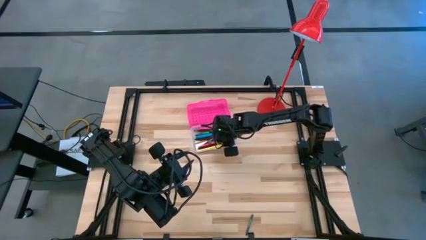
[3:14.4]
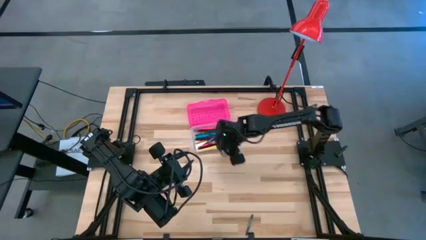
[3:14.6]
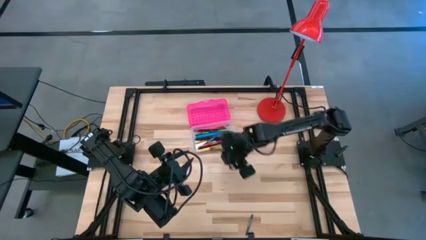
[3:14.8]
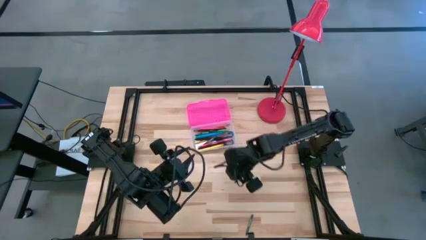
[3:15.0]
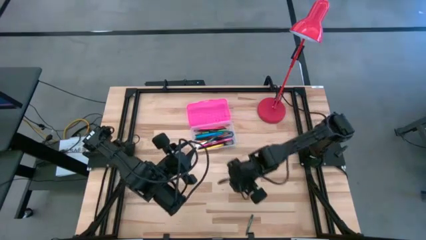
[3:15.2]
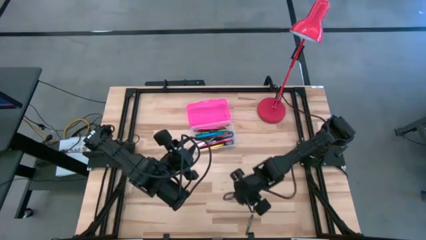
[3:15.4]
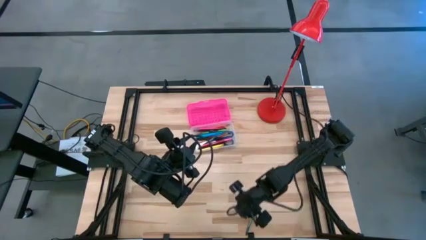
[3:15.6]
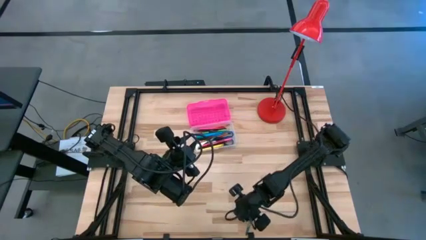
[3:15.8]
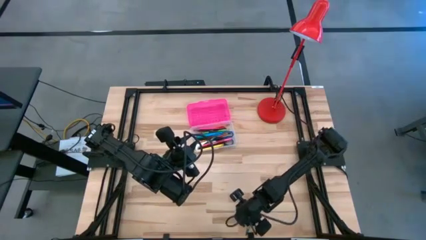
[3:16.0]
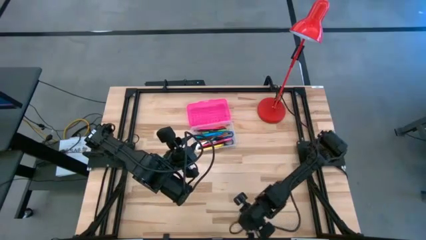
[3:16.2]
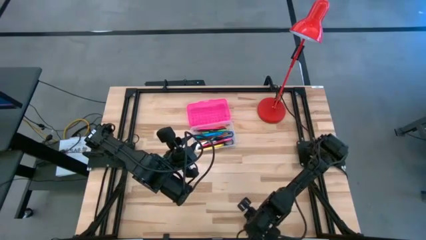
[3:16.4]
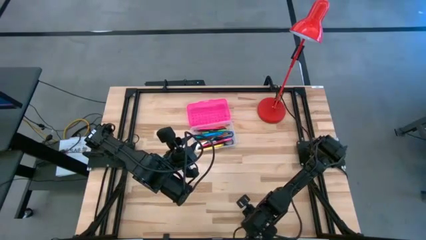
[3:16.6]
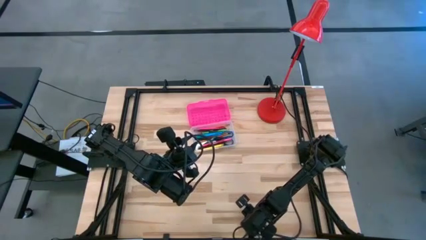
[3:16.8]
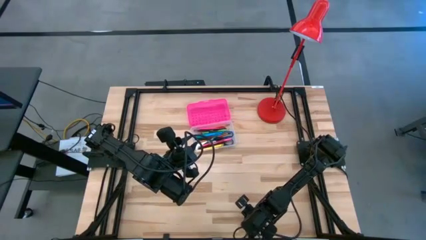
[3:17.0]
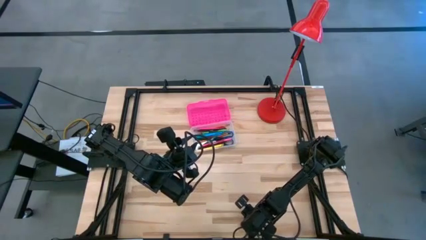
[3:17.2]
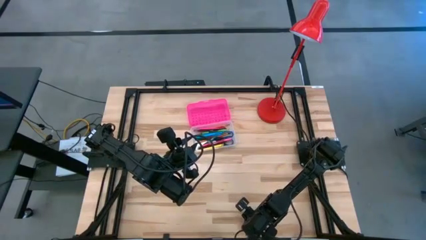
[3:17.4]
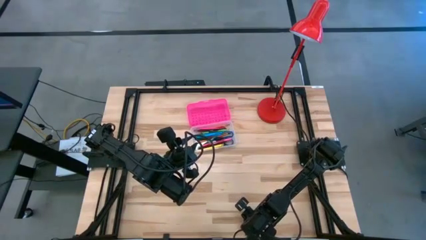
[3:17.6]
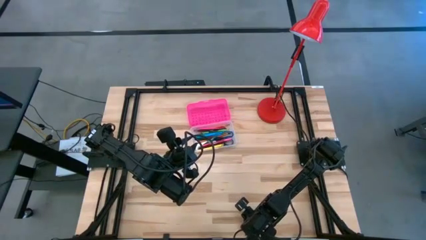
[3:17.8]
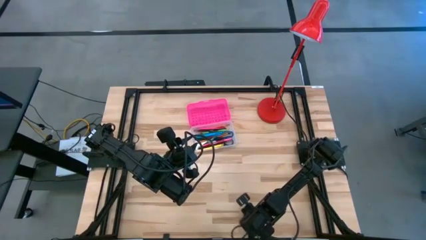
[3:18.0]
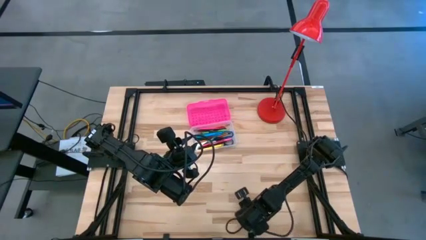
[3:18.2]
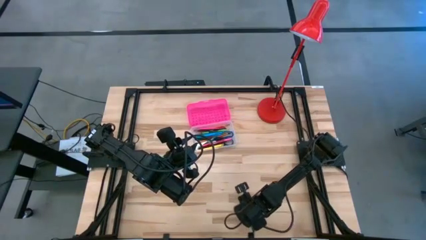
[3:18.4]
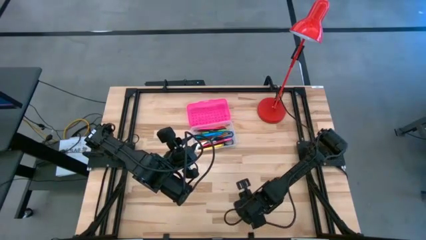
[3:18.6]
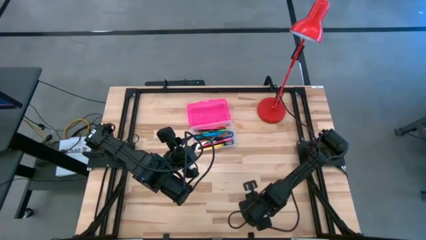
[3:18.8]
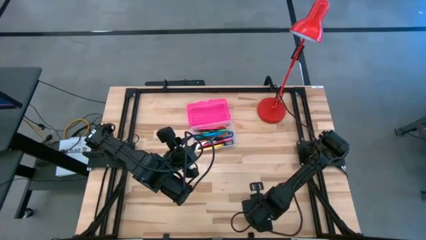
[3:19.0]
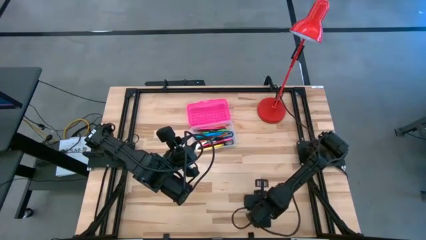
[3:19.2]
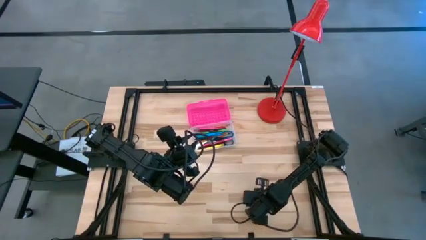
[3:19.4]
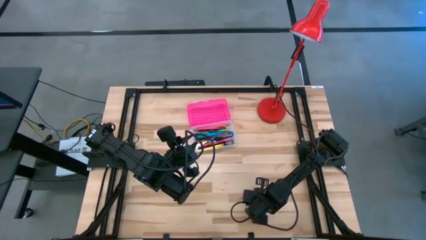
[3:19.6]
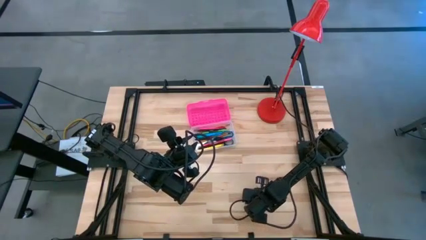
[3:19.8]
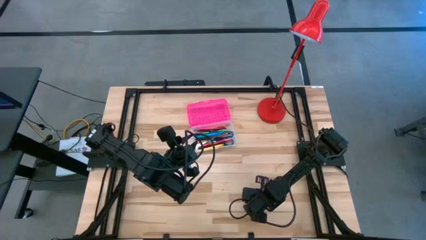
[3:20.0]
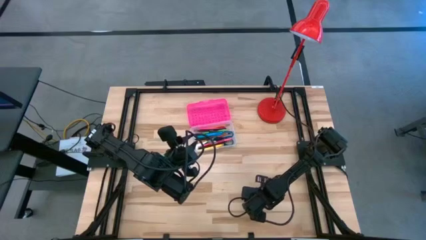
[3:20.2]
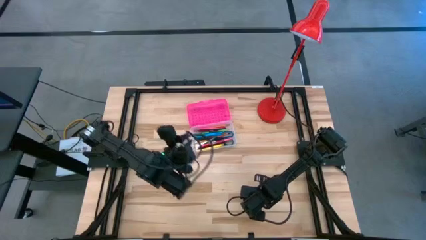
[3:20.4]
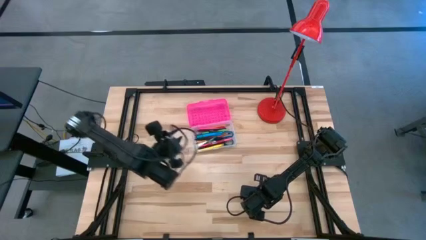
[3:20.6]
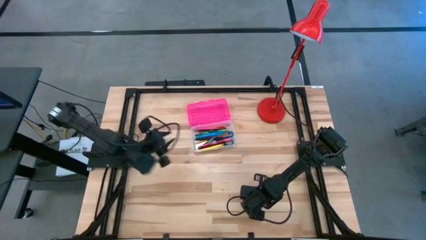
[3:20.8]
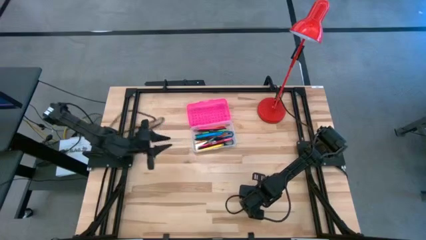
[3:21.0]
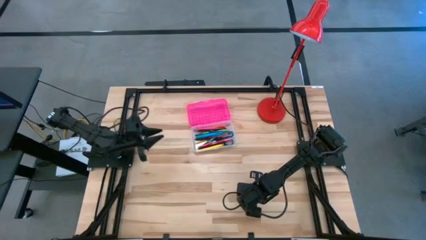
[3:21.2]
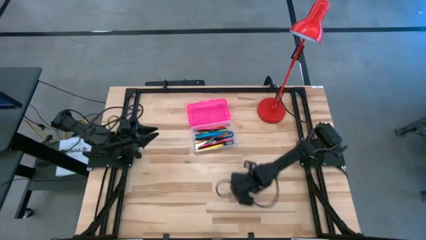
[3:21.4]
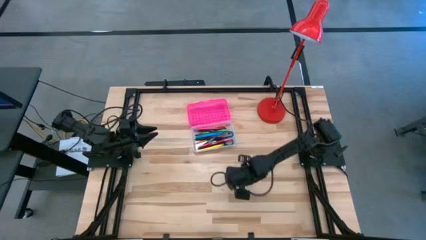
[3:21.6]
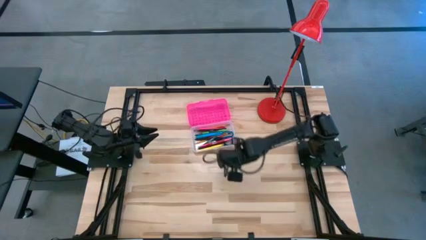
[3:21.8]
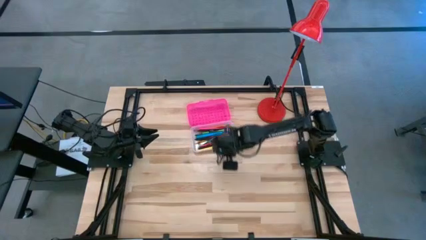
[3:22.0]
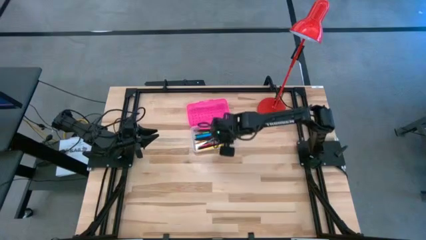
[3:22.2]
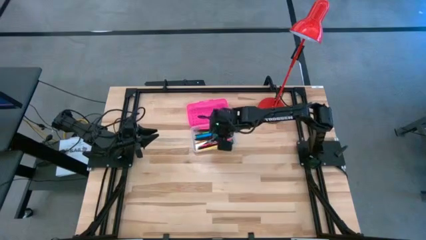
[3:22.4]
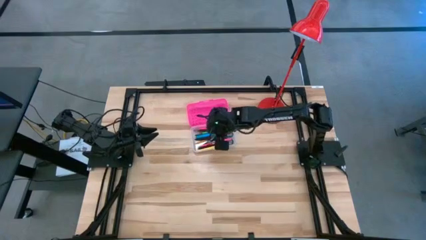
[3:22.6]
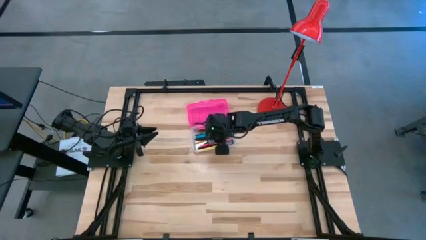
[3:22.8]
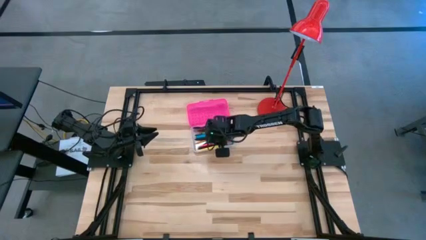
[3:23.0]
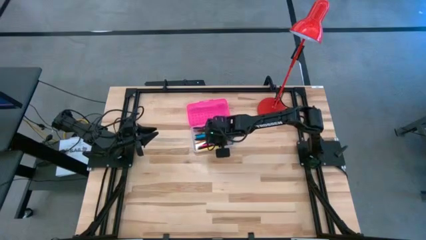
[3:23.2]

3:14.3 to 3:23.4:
Task: Pick & place school supplies into a supply box
Put the green crayon into the pink supply box

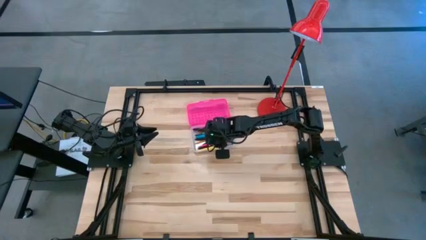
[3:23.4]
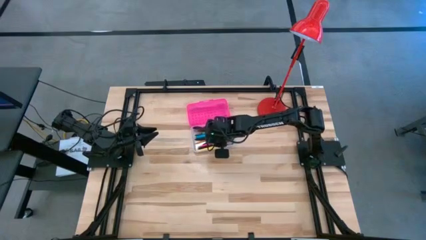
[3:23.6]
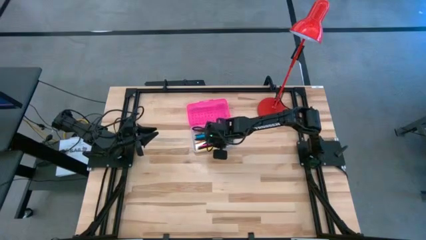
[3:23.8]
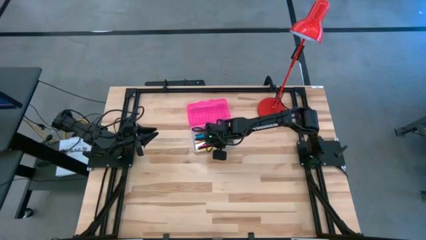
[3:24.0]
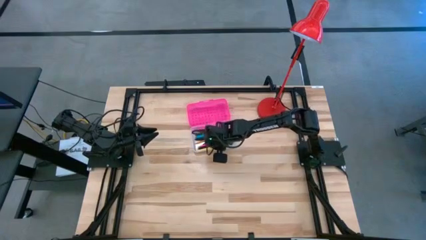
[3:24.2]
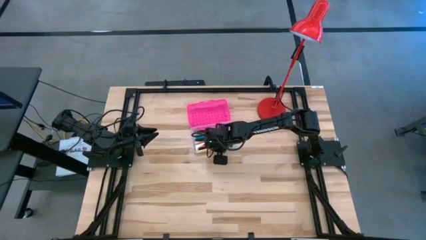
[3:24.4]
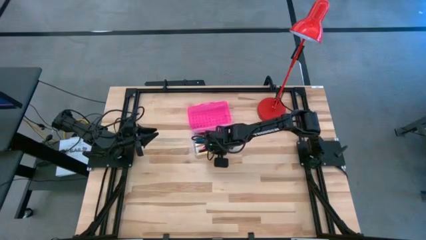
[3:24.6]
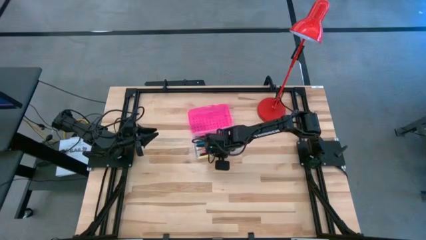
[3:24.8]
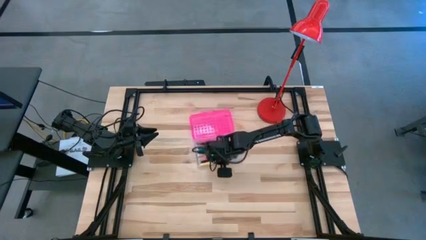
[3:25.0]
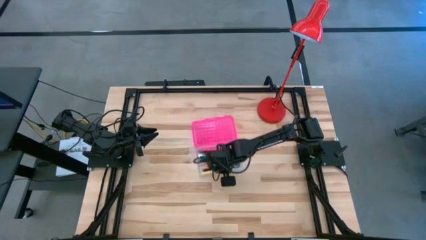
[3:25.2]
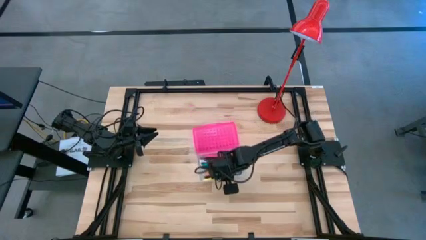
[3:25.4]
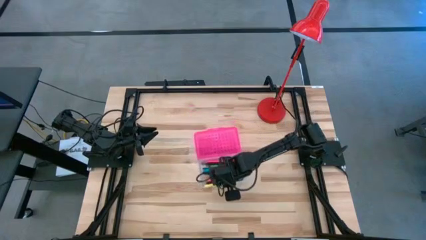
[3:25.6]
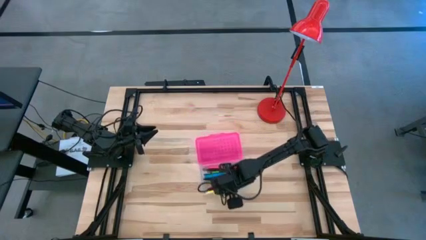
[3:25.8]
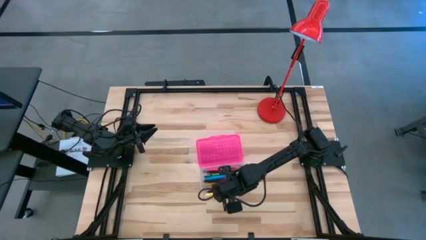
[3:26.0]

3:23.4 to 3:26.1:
Adjust the pink supply box

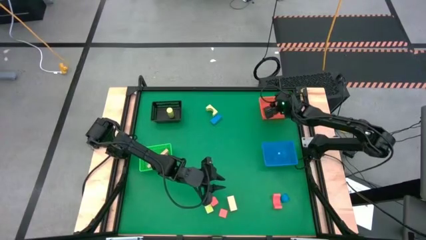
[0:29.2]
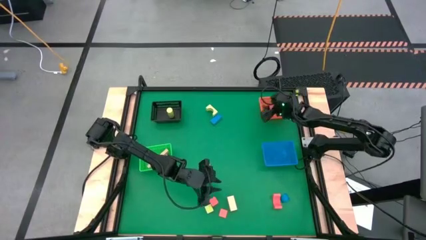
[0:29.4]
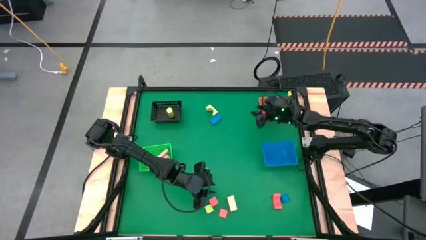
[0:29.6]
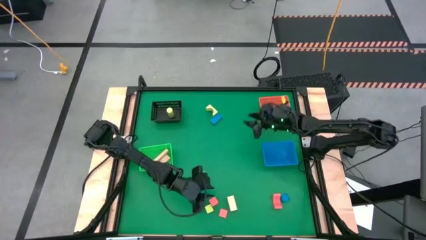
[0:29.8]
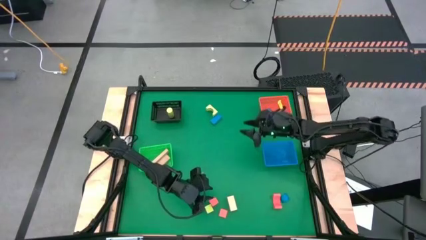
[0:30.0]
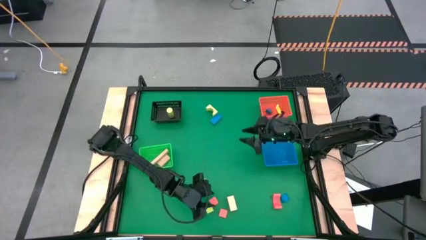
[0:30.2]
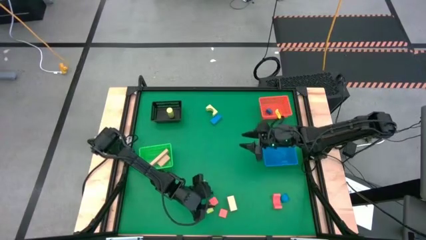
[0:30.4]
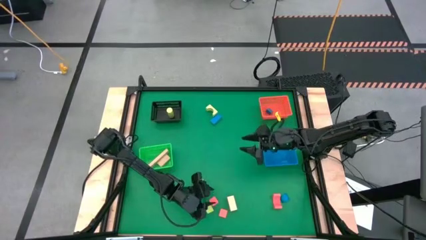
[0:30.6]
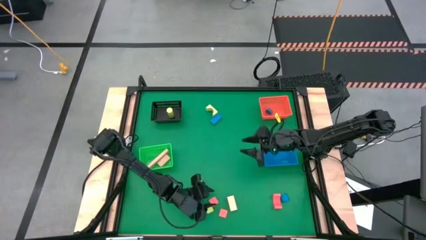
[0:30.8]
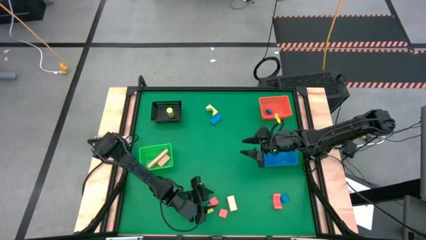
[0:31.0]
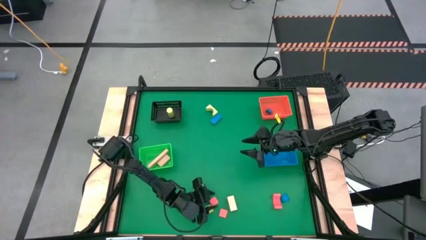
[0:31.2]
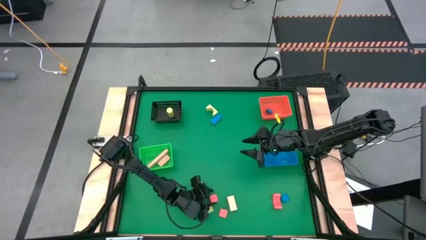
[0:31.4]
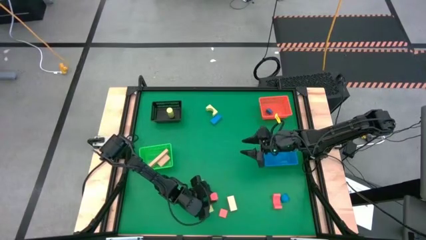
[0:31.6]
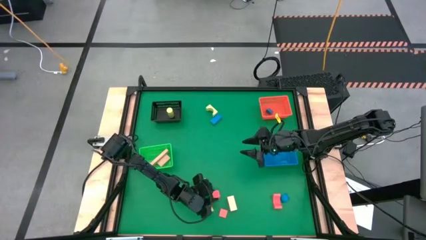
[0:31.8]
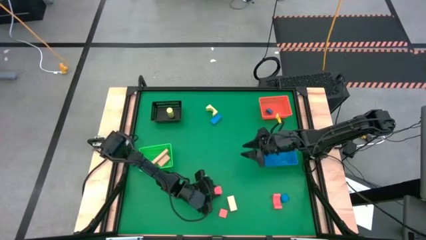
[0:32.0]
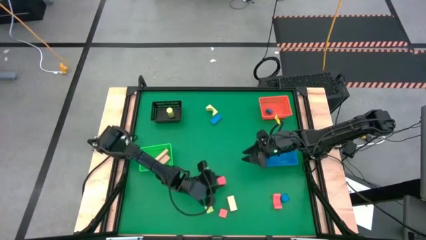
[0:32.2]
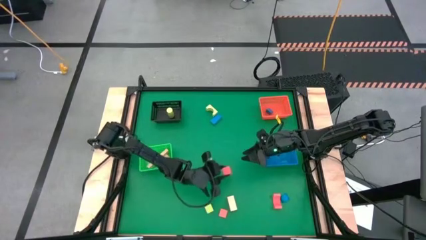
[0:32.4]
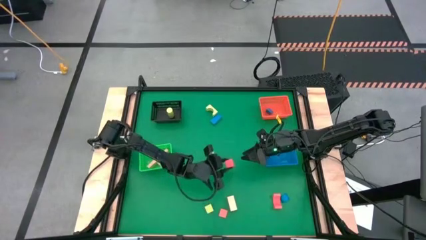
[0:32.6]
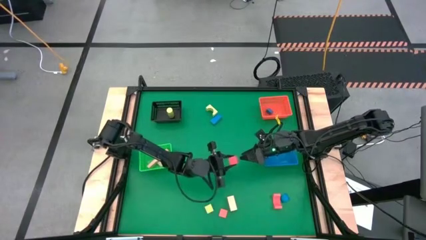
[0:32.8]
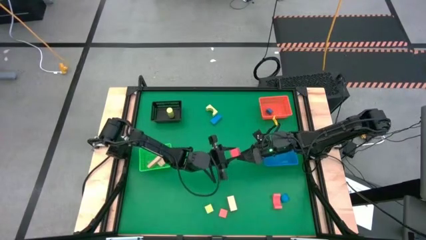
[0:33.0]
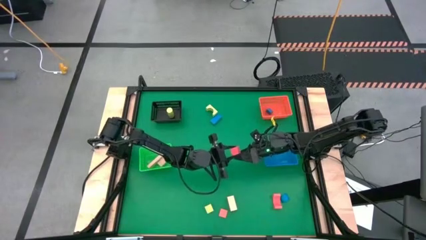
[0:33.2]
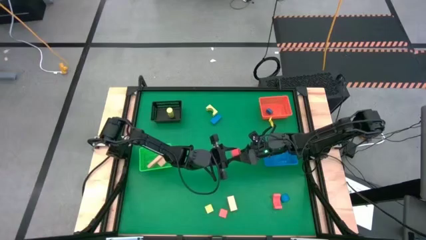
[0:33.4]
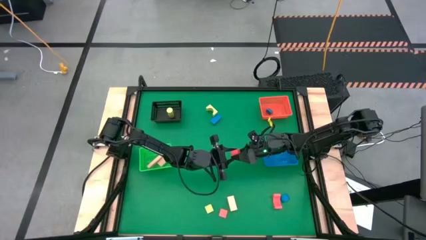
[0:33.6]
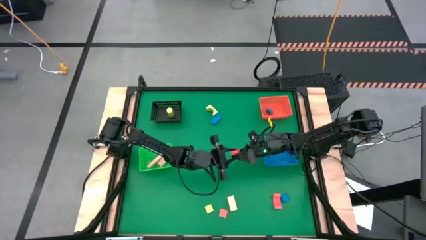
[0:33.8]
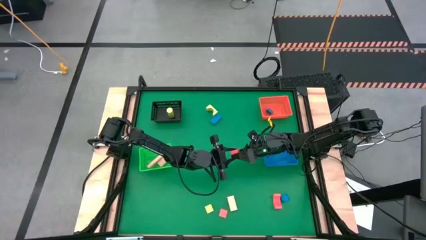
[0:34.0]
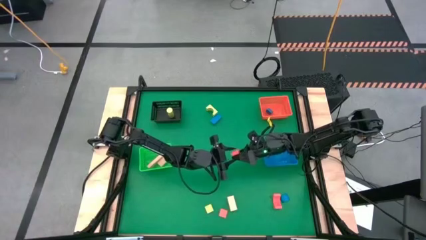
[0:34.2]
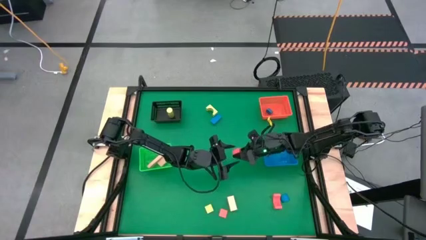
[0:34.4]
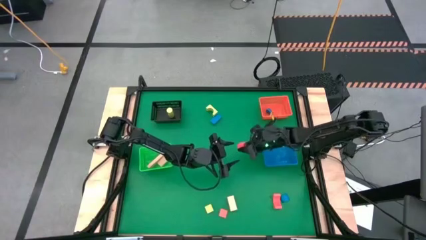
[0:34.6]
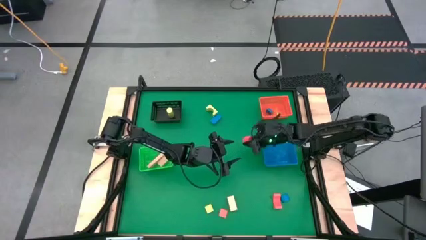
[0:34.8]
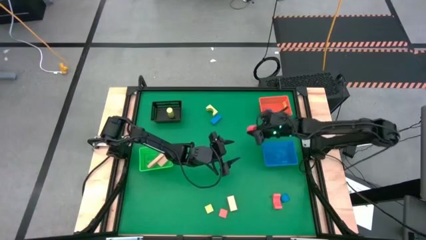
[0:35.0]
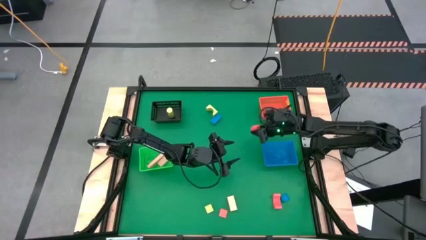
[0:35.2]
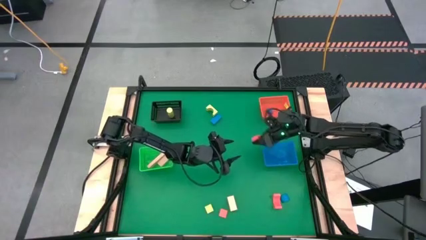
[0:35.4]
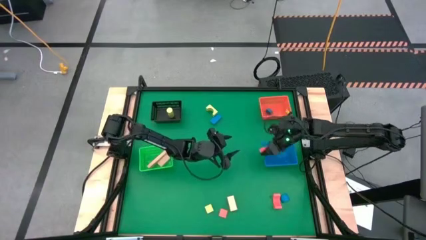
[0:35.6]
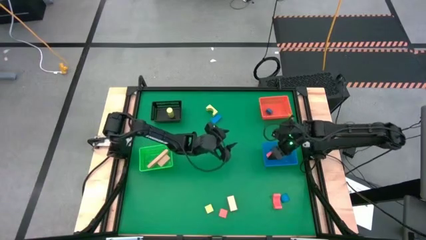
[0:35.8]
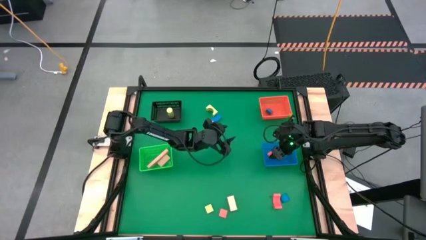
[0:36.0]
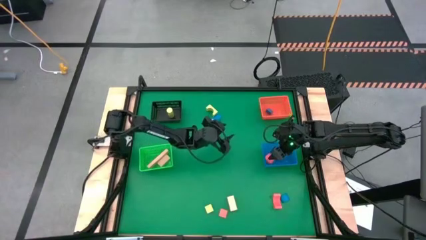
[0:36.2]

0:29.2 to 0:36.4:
Task: Sort & place blocks by color
Put the orange block into the blue bin
